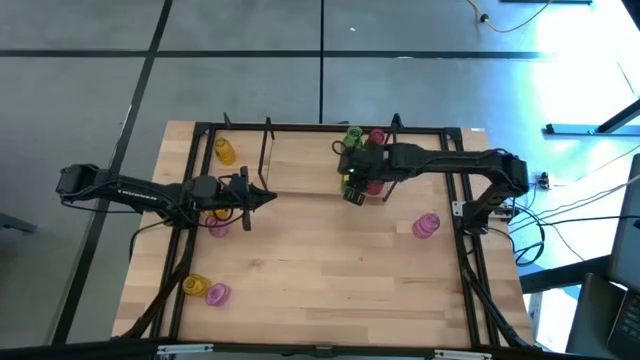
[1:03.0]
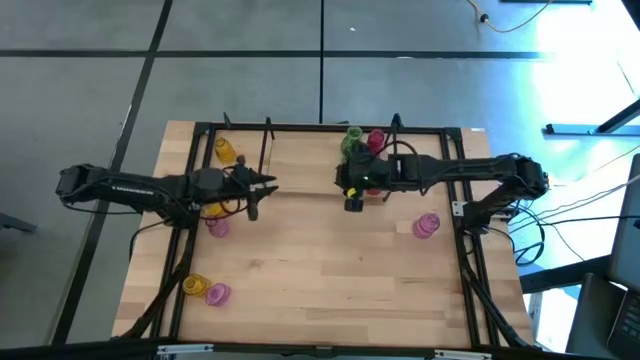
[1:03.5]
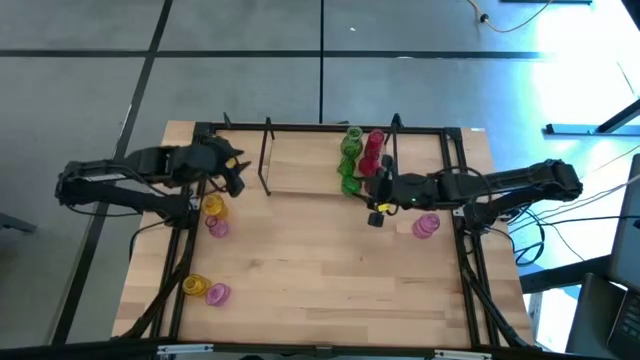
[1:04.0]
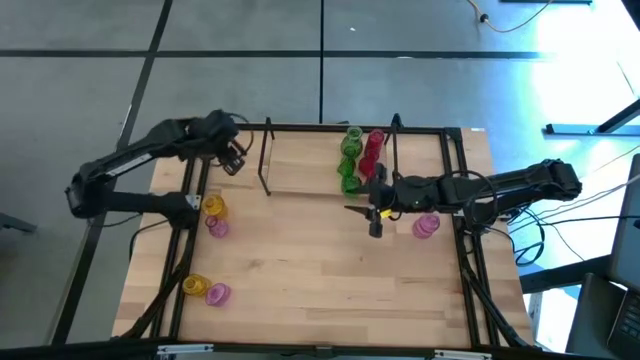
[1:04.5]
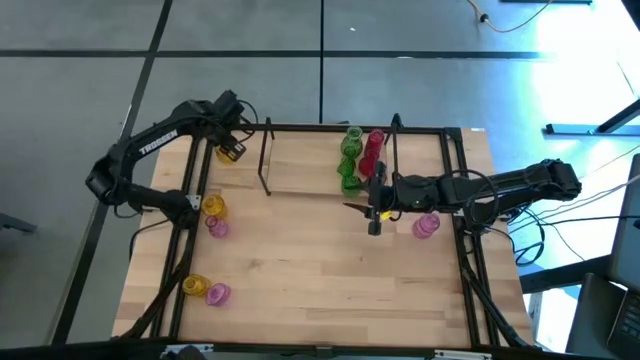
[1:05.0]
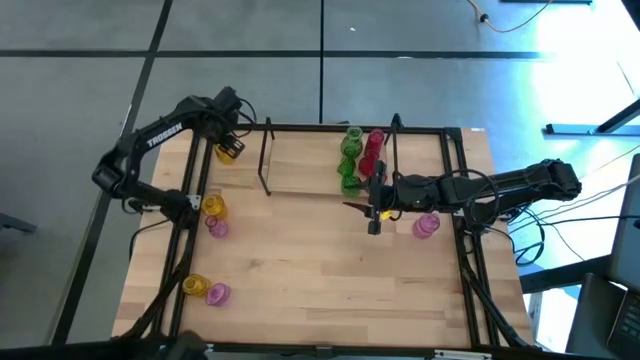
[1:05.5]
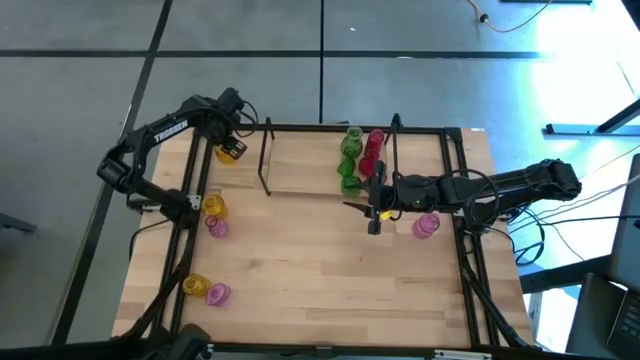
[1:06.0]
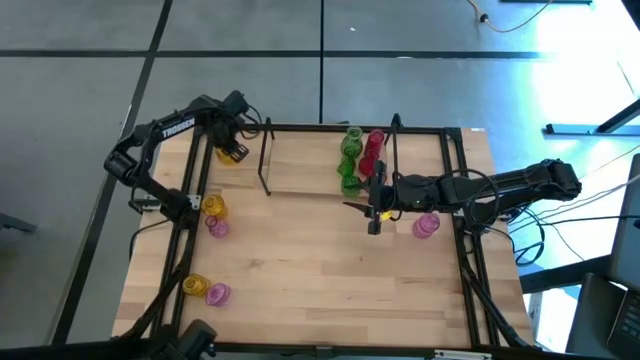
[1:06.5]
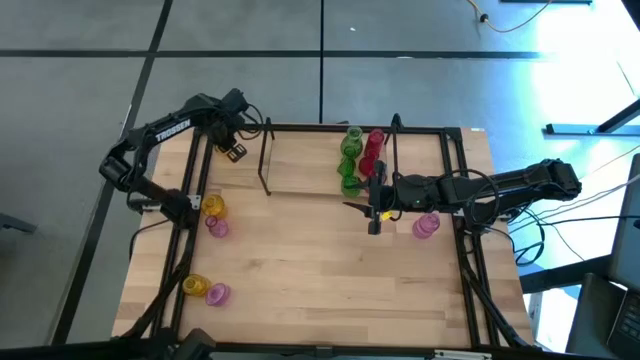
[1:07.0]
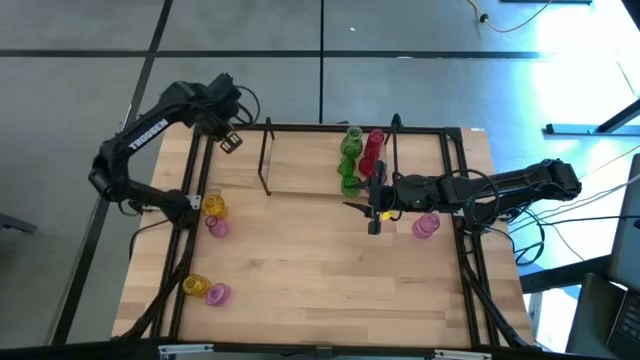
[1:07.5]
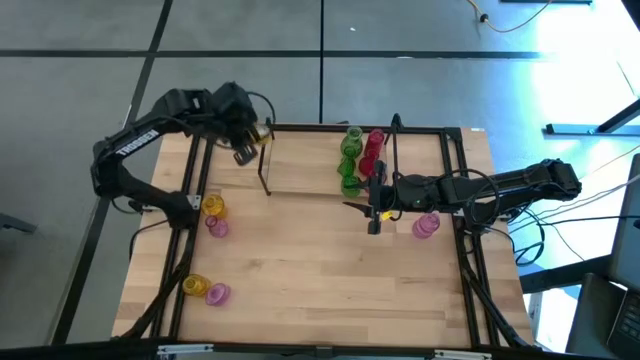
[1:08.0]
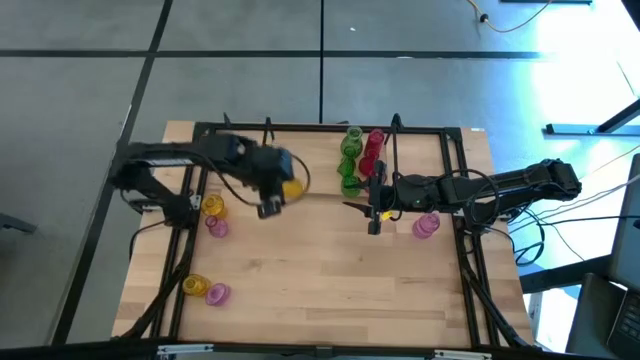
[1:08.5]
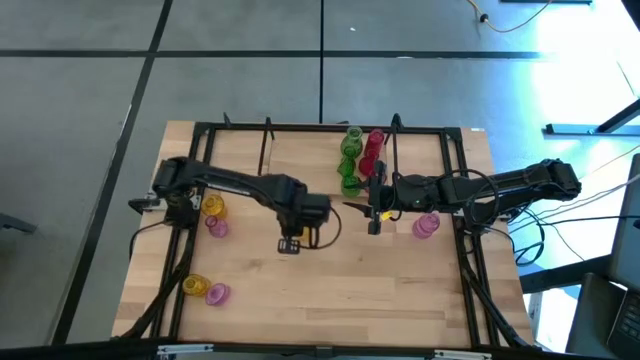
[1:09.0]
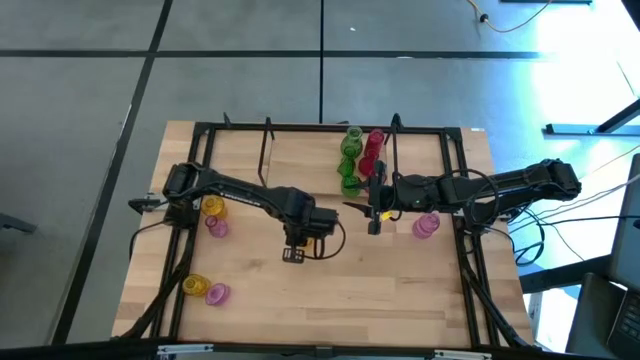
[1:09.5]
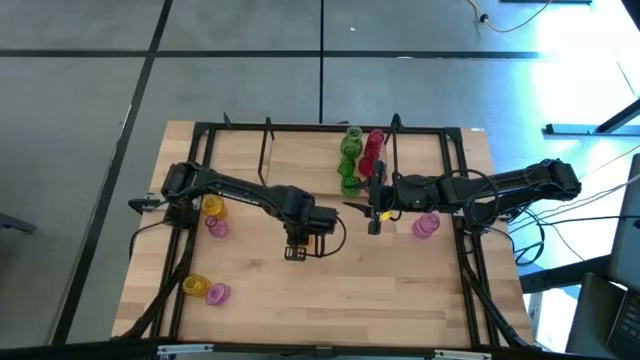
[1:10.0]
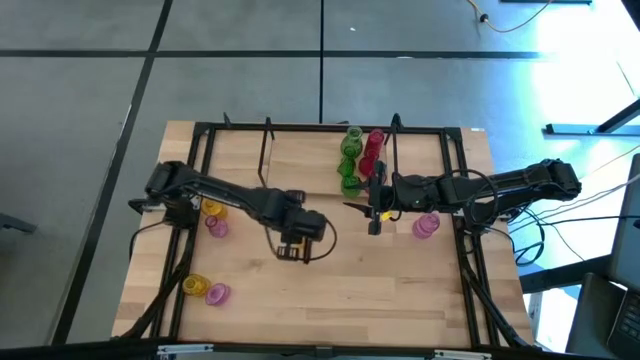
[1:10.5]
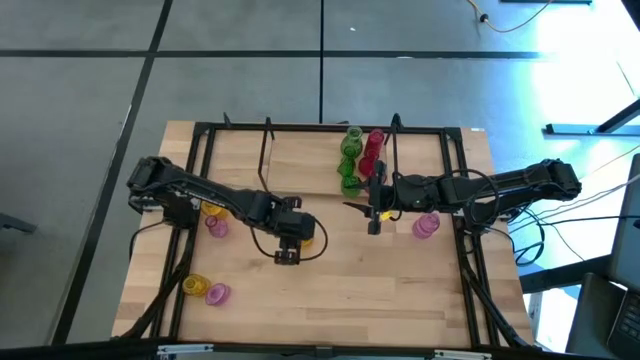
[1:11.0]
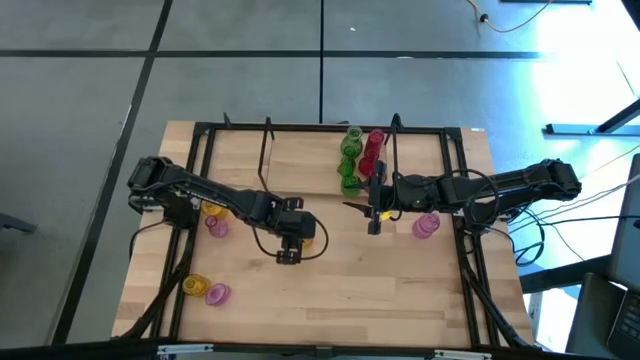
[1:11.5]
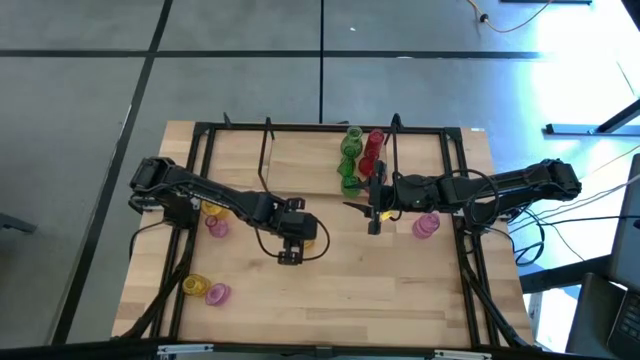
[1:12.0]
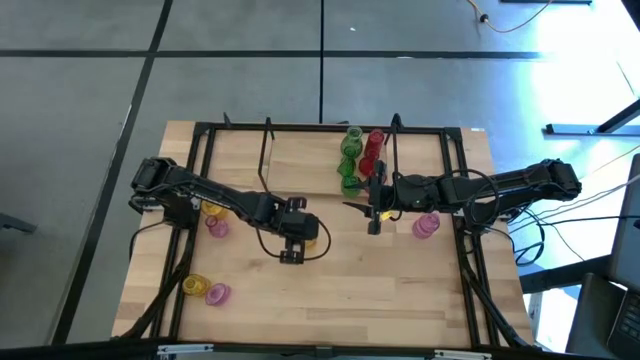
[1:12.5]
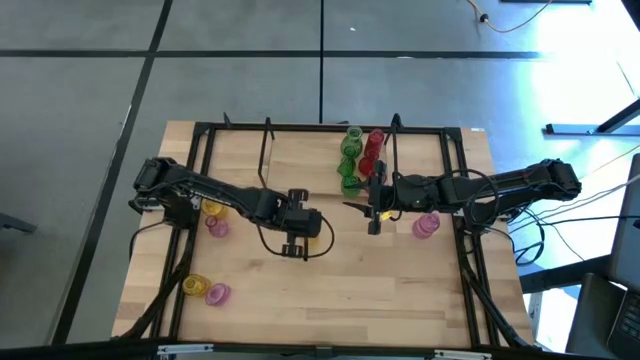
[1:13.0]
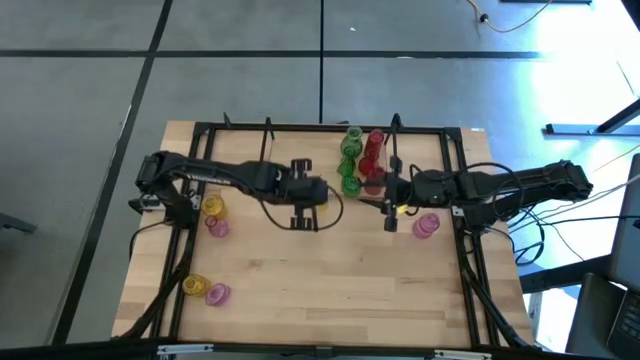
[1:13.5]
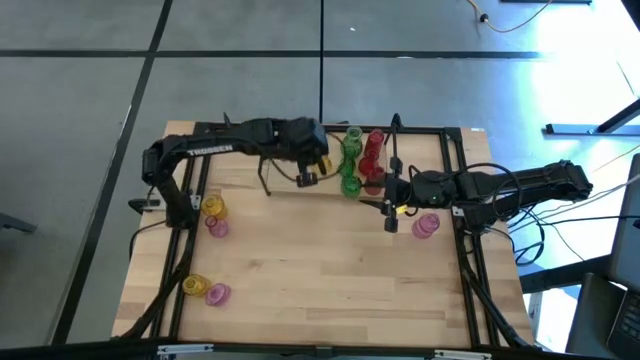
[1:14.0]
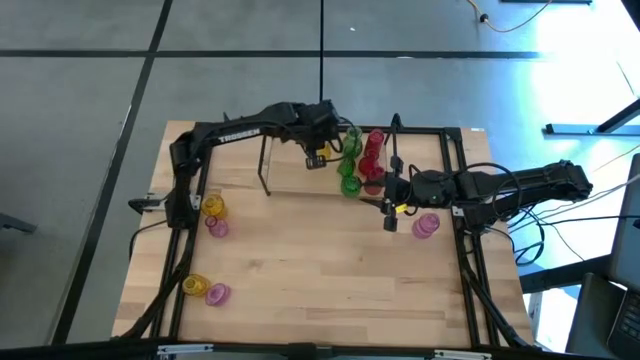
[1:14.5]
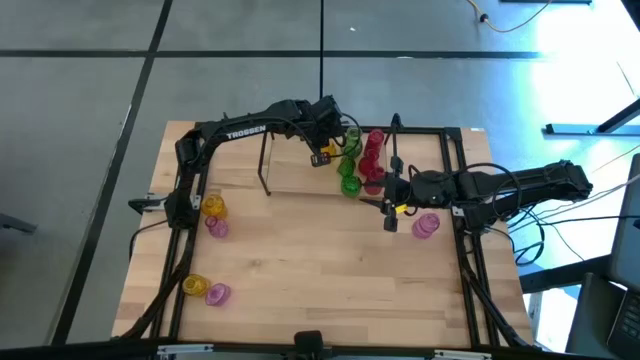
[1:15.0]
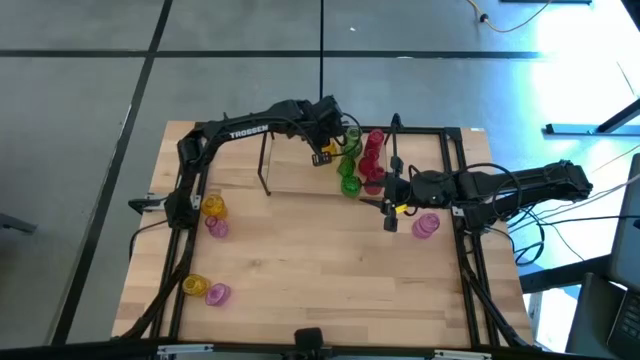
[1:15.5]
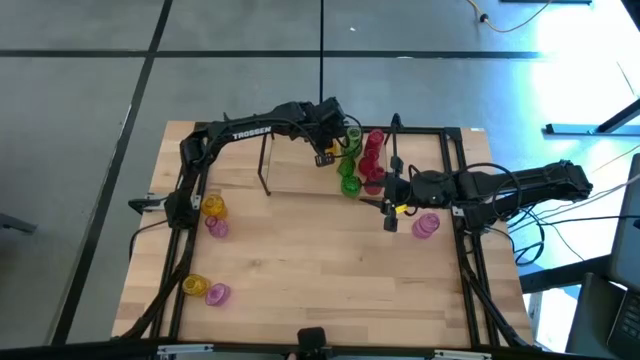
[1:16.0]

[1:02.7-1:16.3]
Task: sort vases onto shelf
Put the top yellow vase on the shelf

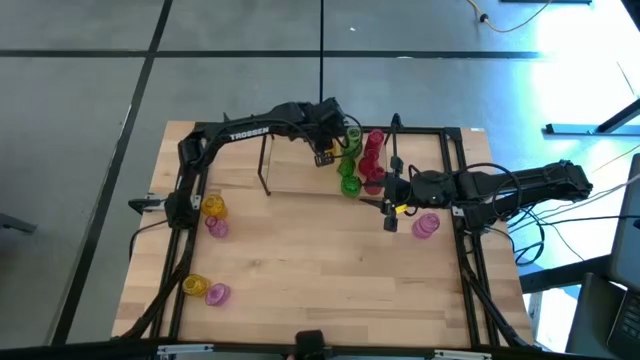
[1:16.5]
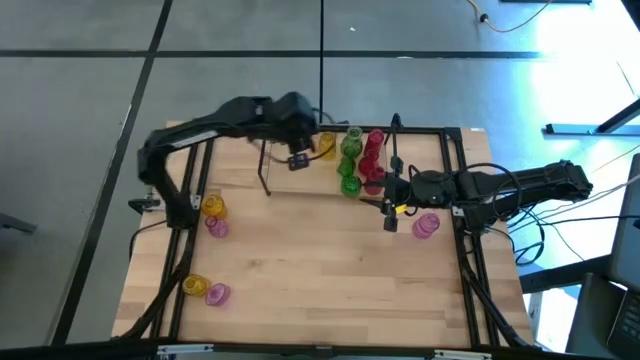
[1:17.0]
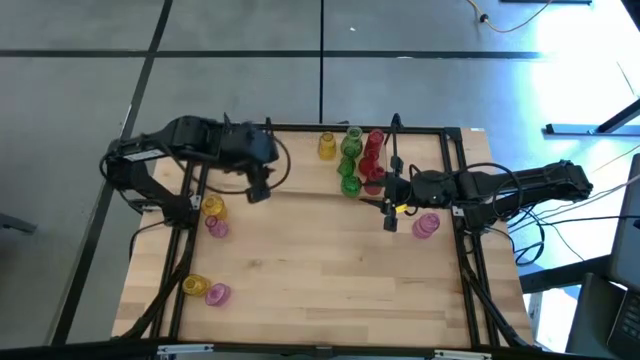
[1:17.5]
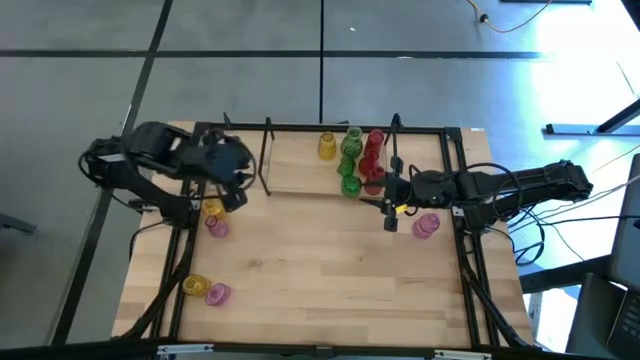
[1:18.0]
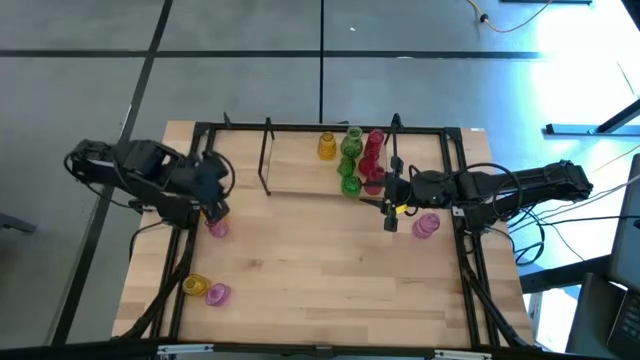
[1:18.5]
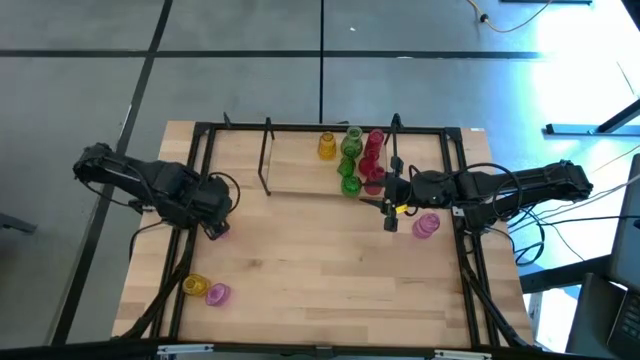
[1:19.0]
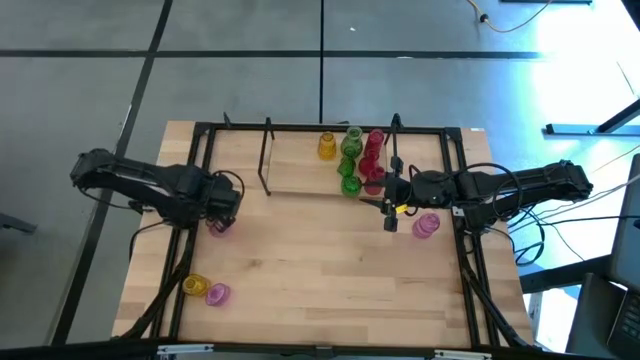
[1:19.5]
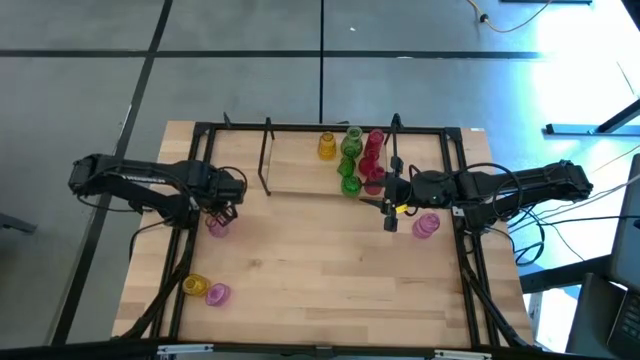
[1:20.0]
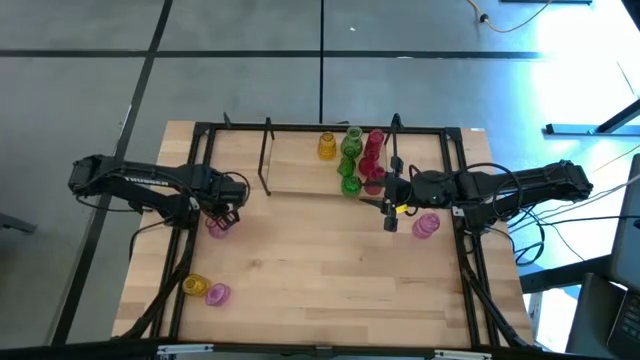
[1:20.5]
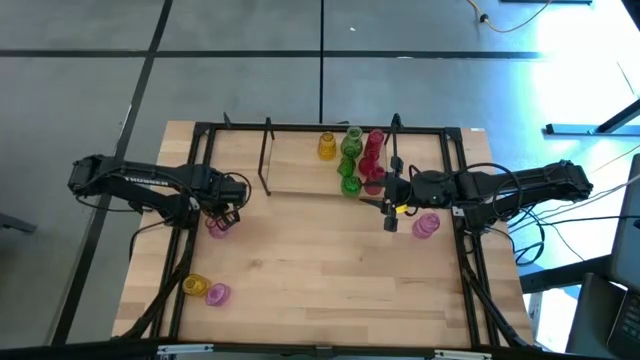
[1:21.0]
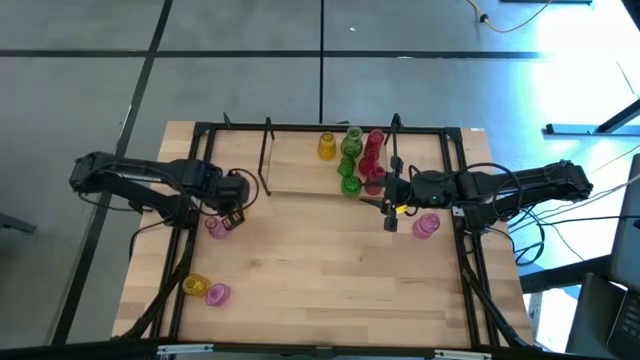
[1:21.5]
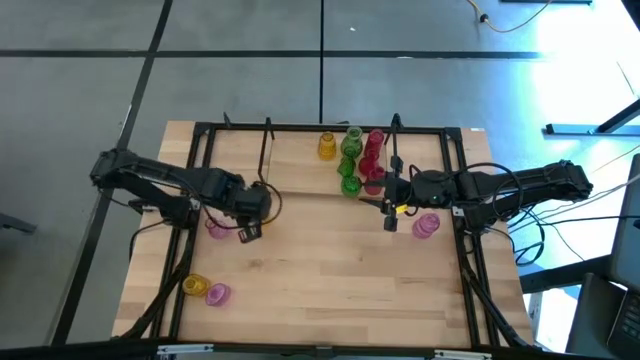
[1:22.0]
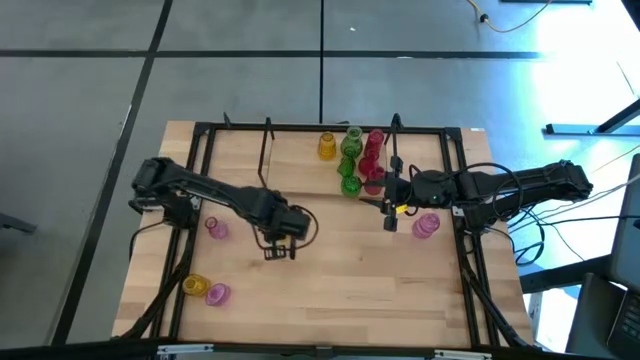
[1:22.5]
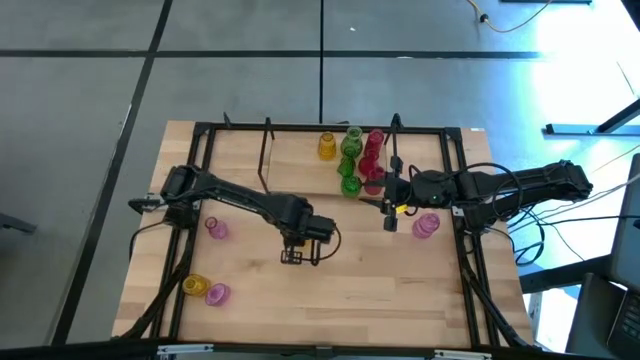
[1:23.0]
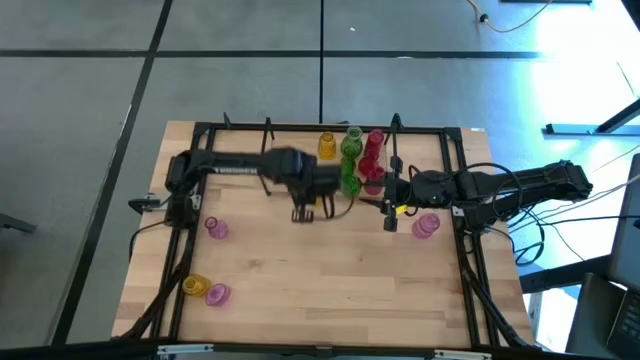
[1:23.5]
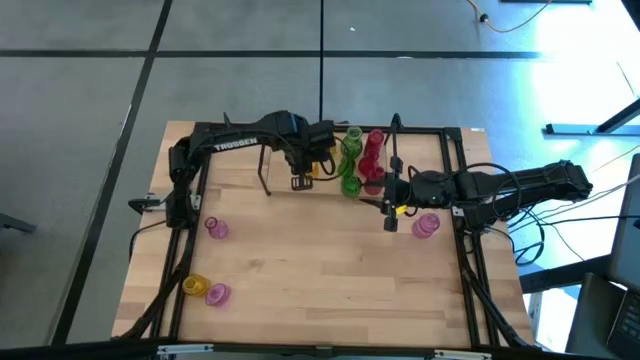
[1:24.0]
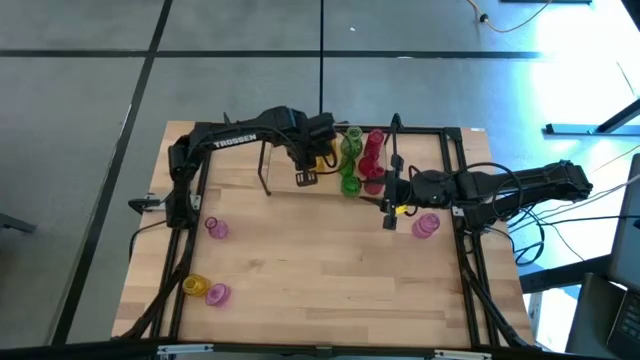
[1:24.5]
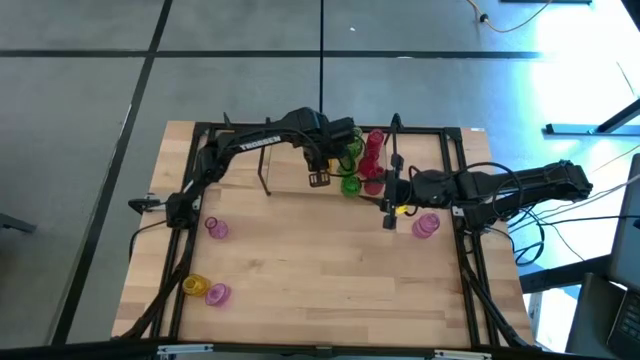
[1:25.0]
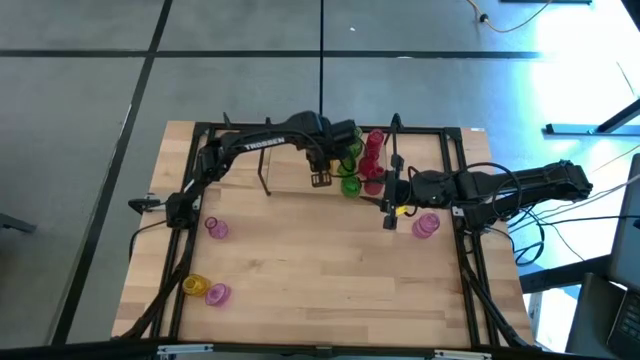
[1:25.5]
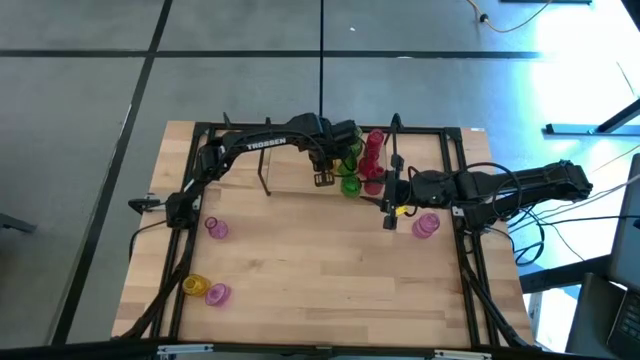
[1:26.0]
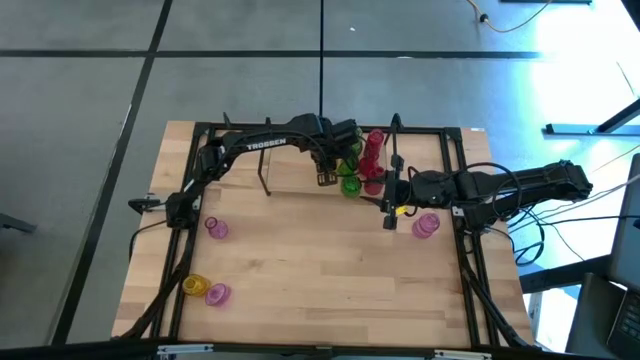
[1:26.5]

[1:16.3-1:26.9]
Put the top yellow vase on the shelf aligned with the other yellow vase
